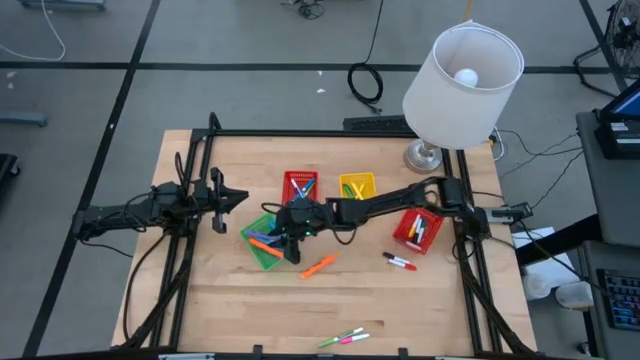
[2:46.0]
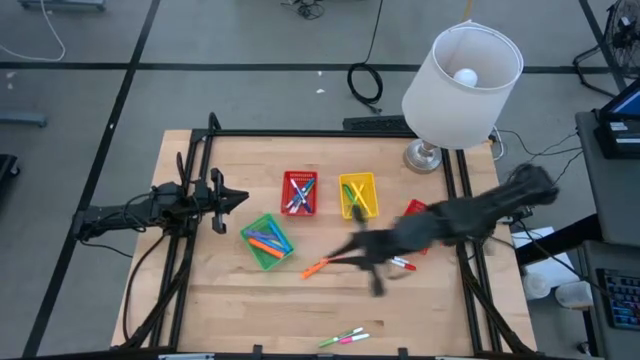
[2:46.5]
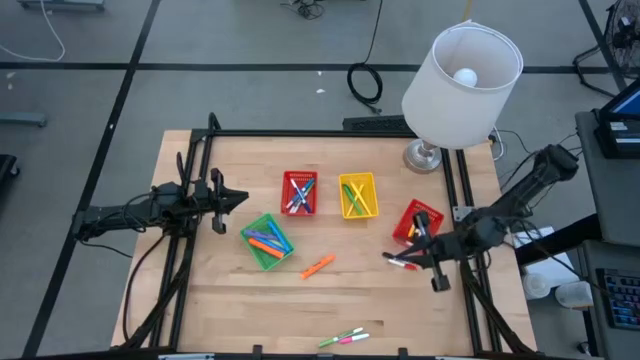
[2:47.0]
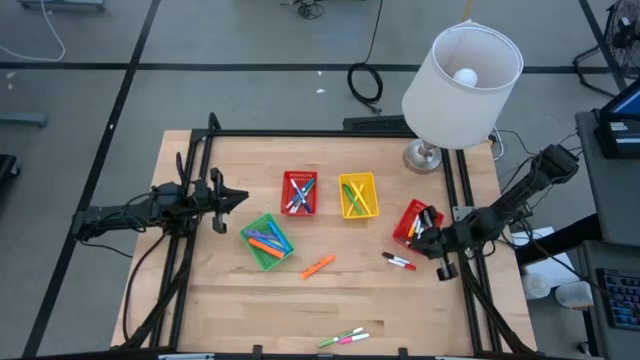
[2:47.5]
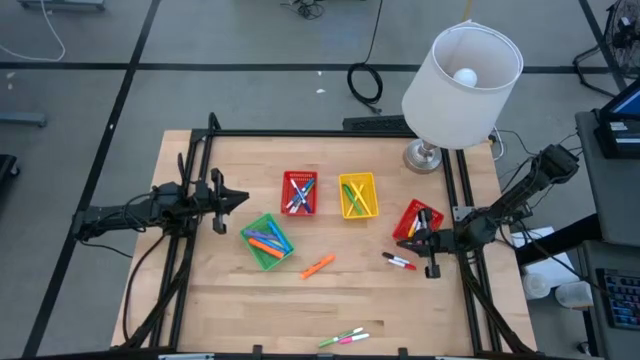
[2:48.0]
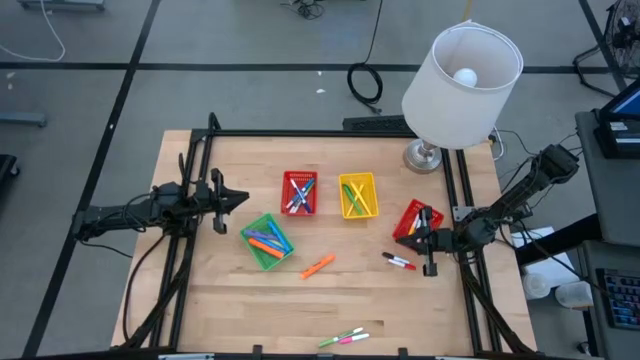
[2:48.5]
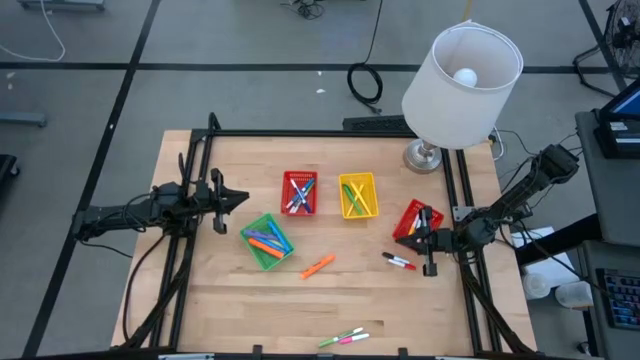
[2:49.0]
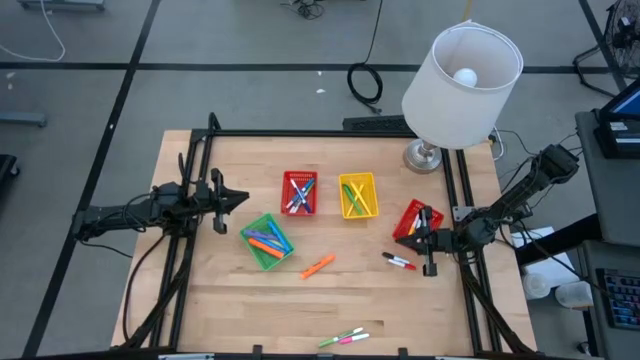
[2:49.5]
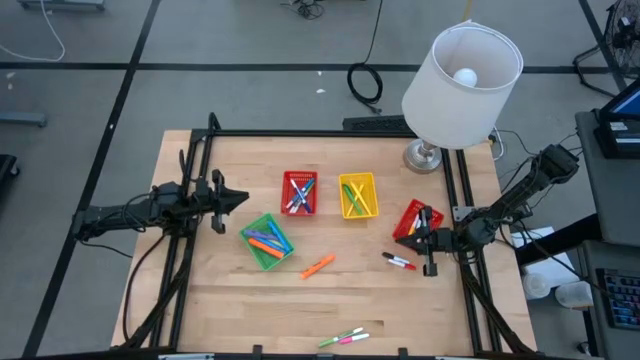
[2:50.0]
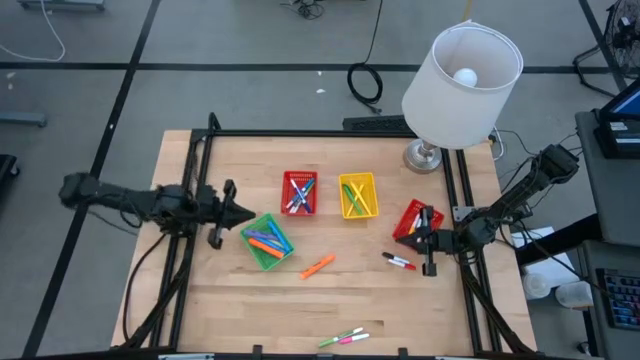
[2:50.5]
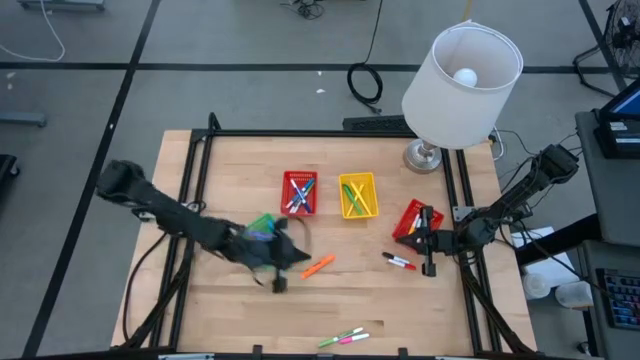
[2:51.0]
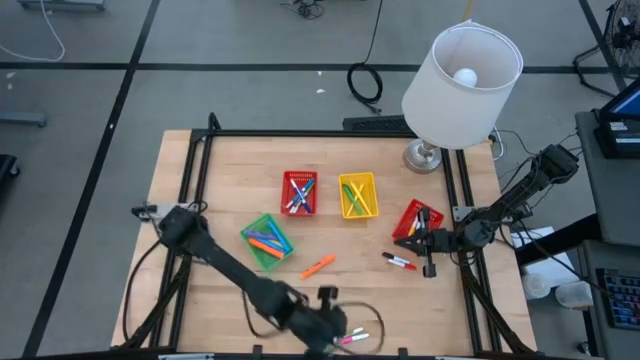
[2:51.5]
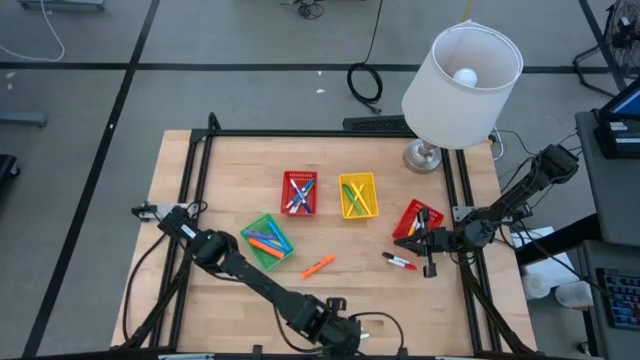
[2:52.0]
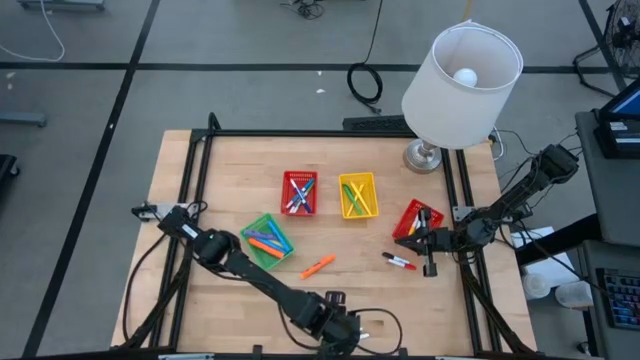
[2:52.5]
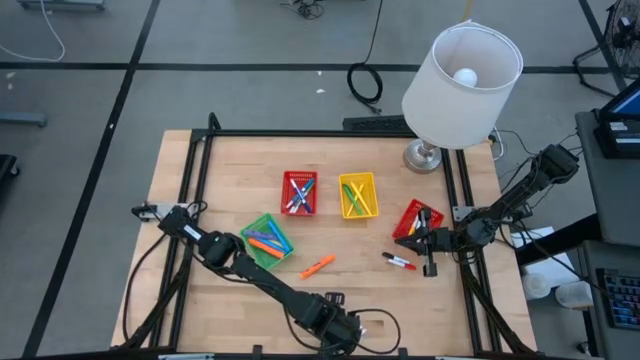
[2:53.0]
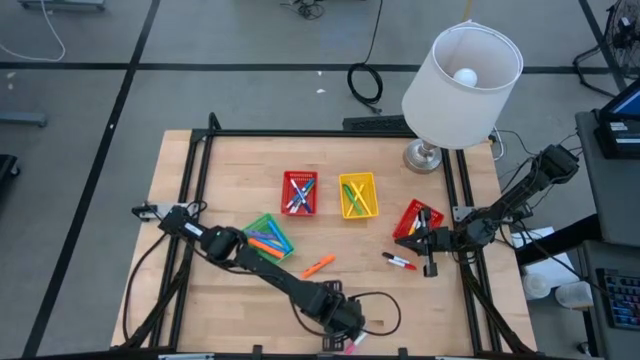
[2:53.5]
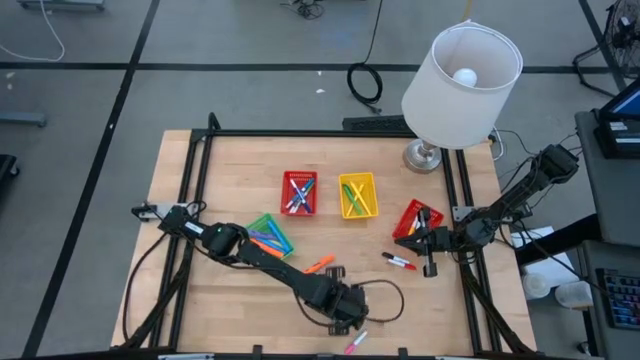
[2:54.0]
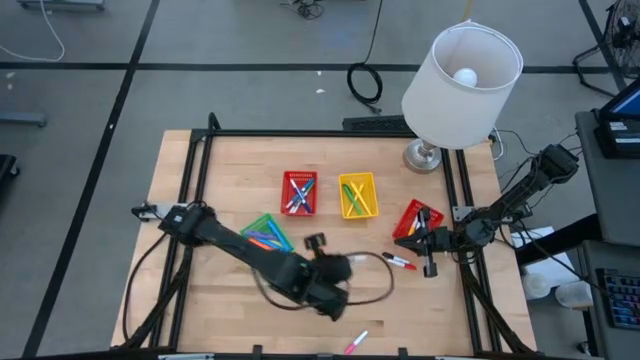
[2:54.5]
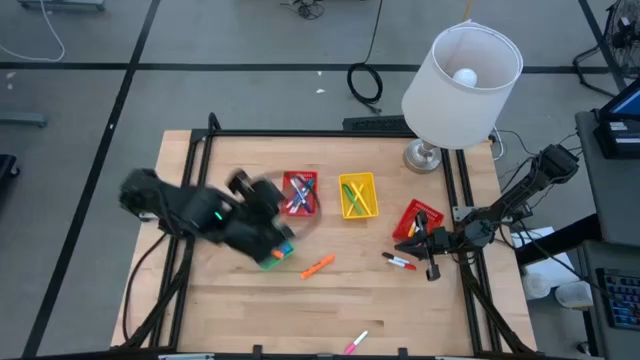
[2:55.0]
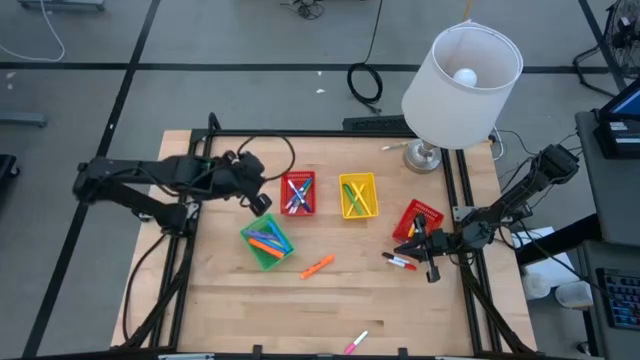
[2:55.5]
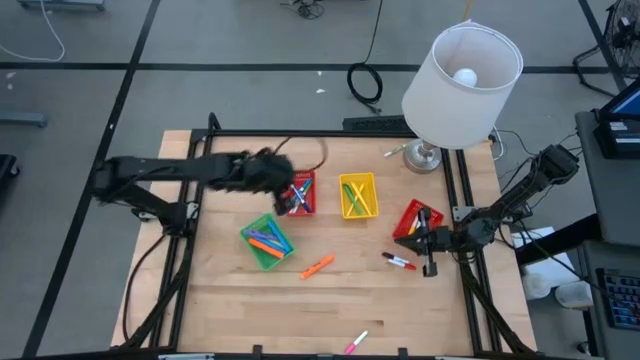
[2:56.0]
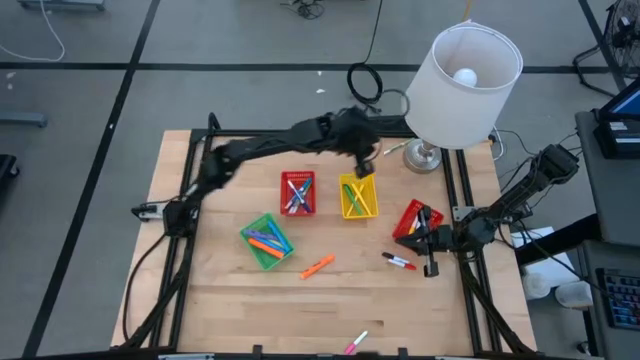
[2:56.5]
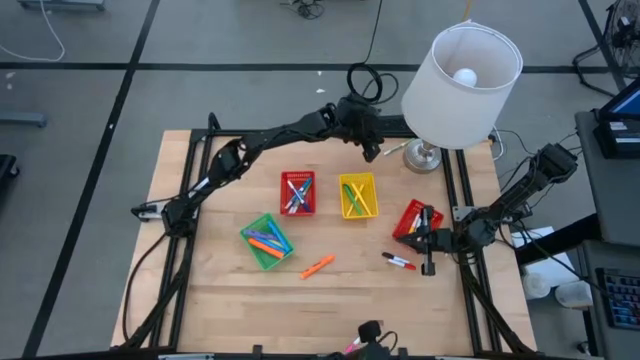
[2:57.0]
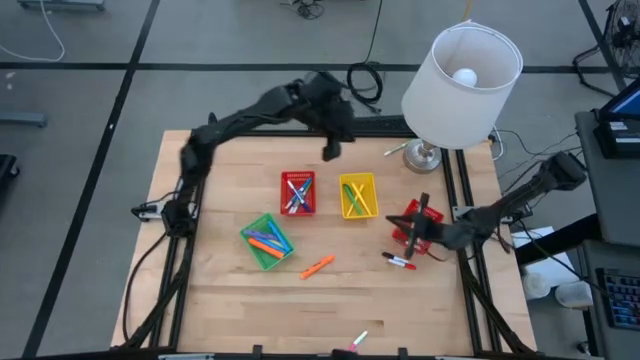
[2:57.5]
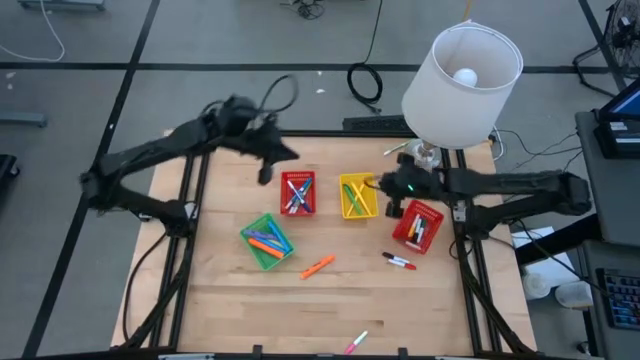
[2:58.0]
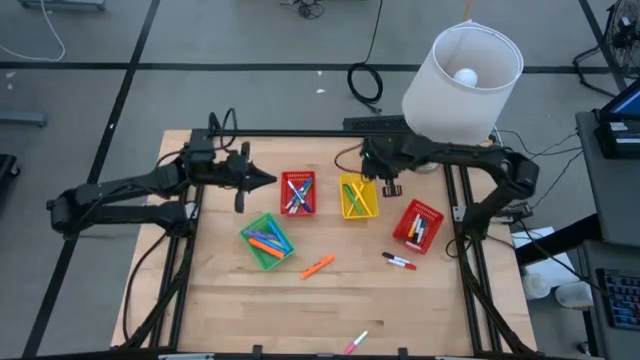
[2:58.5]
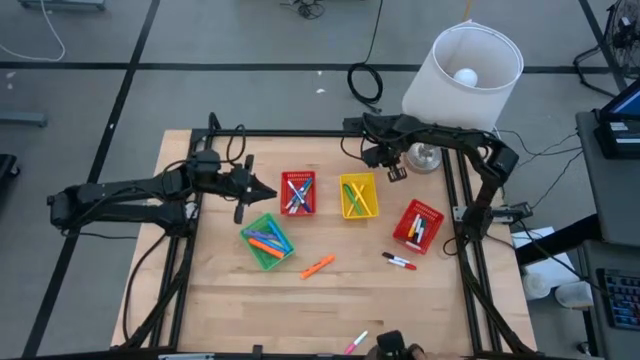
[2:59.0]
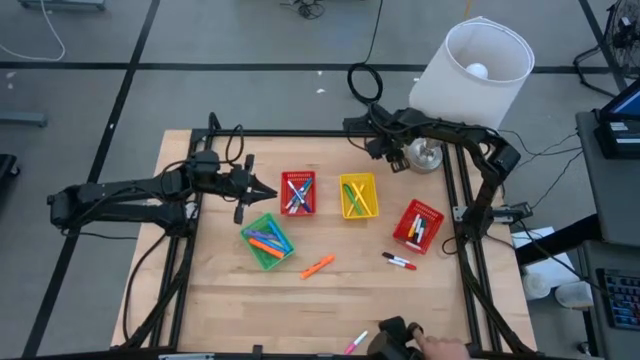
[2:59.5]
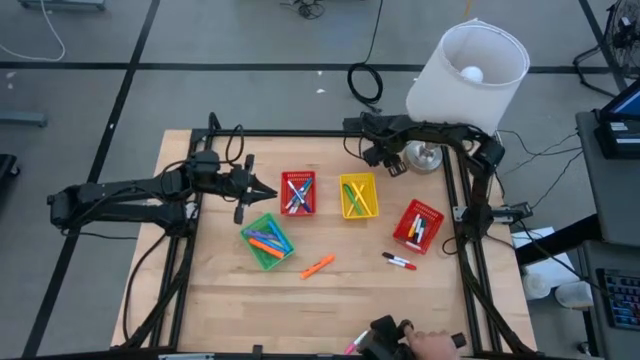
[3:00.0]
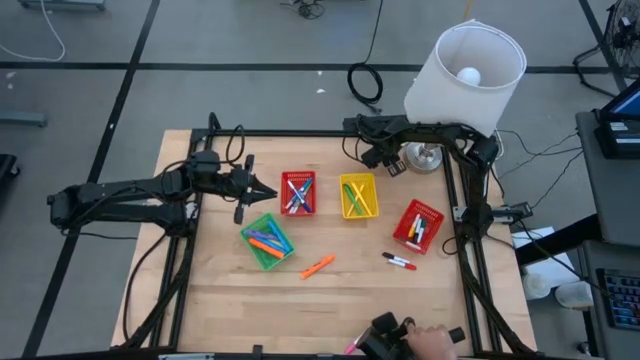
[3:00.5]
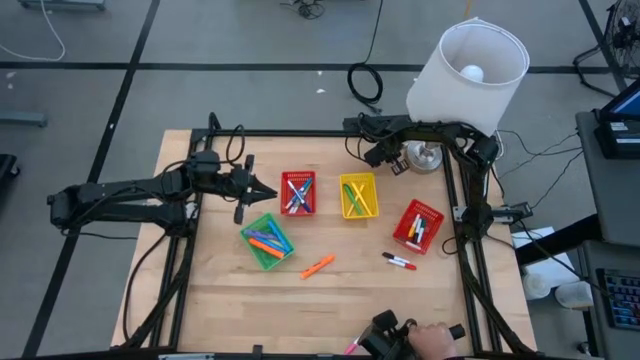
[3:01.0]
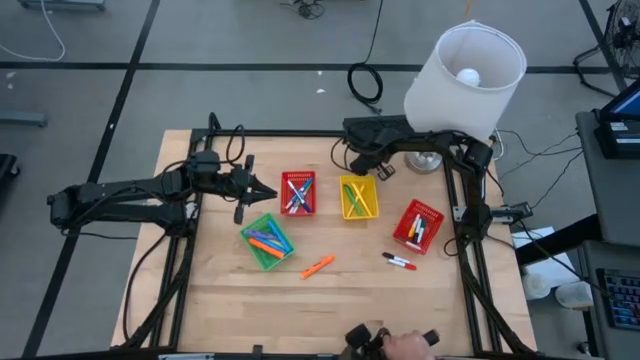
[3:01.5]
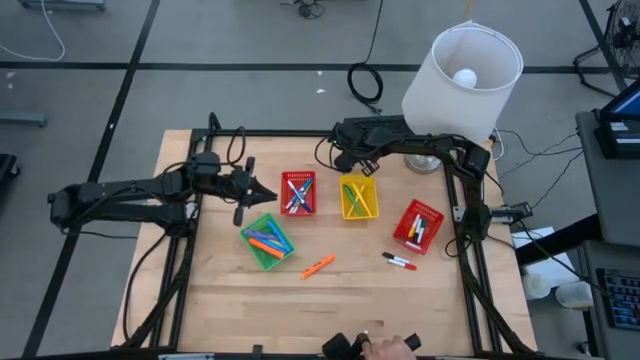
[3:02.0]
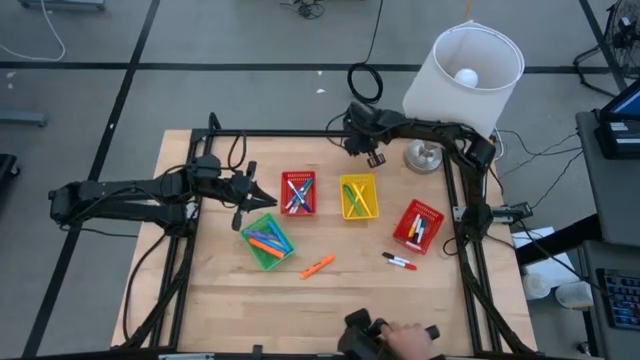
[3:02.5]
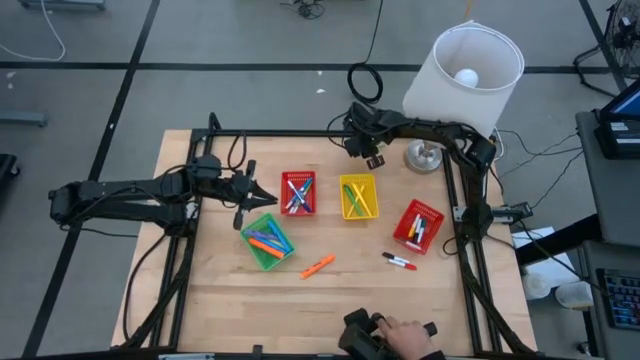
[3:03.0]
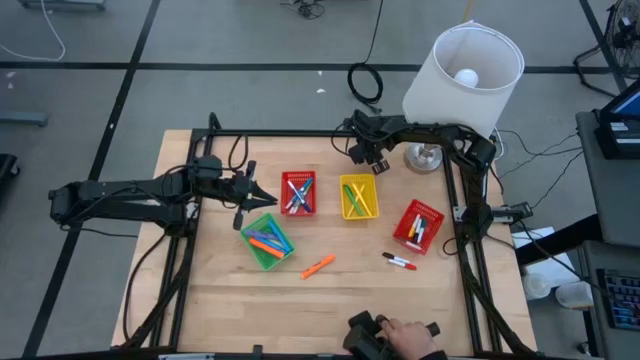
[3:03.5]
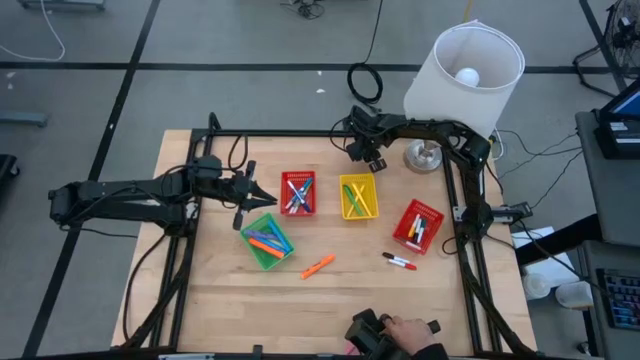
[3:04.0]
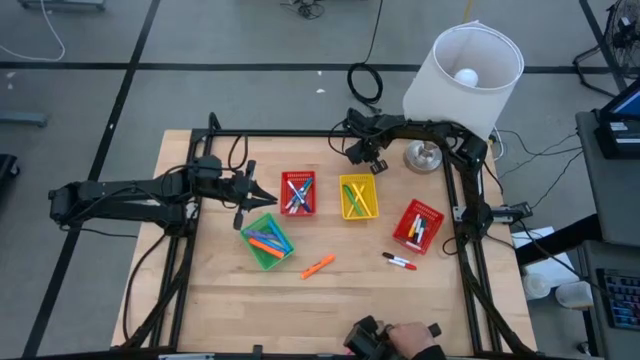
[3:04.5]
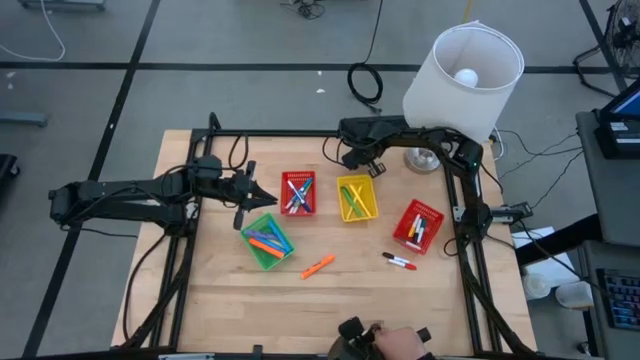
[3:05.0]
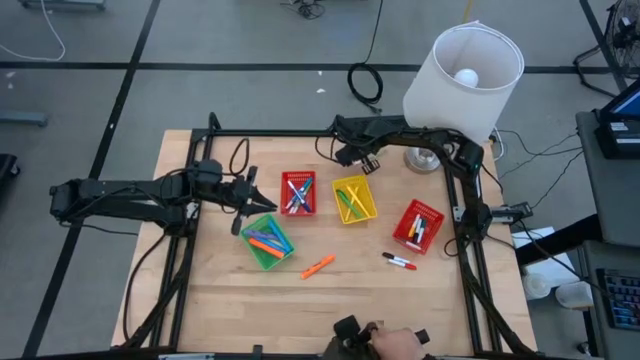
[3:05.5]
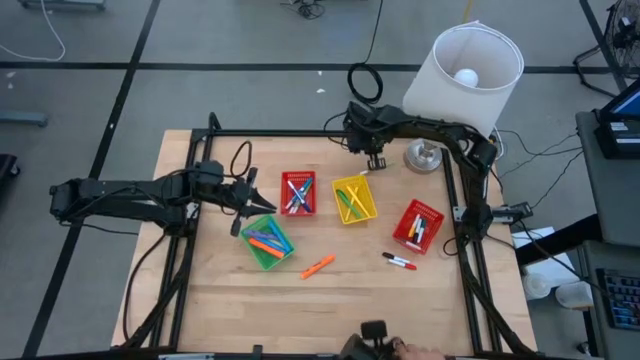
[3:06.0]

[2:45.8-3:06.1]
Task: Pick & Place Markers
Put the light green highlighter into the left red bin

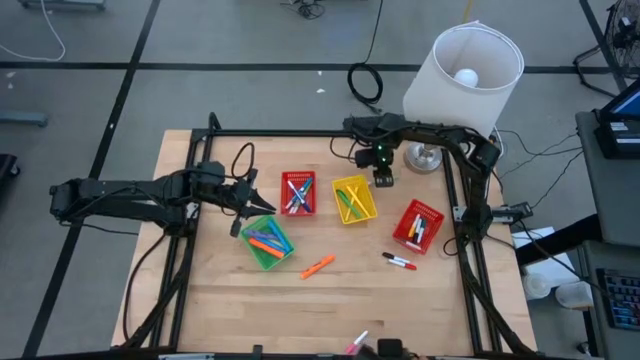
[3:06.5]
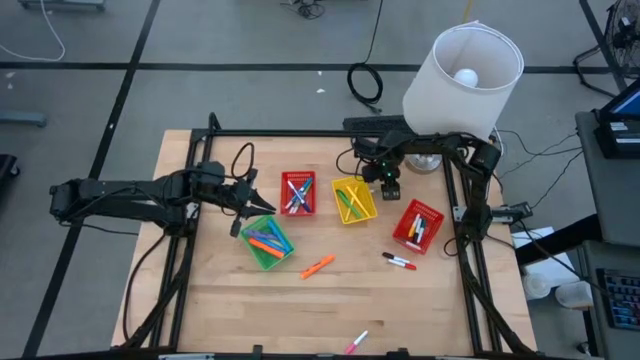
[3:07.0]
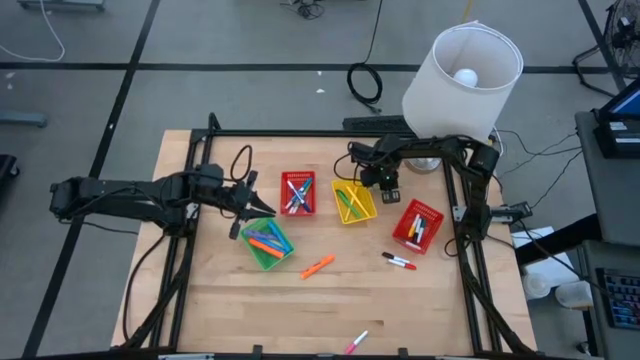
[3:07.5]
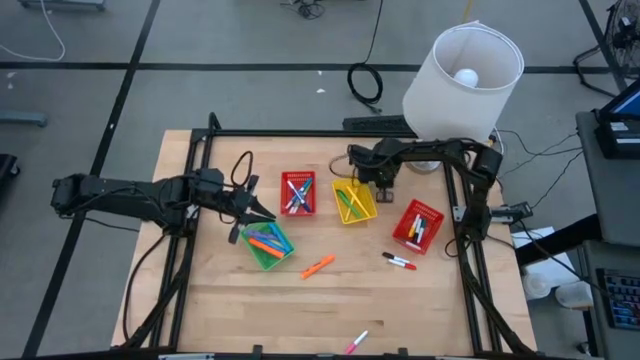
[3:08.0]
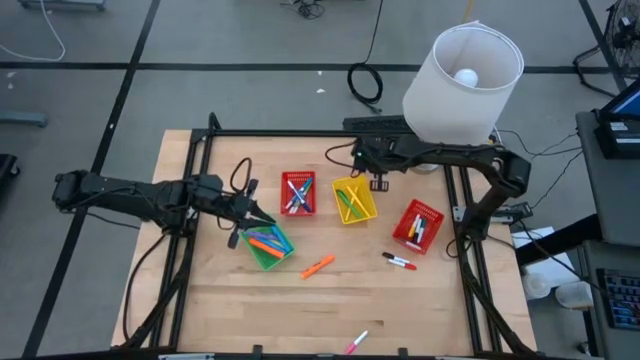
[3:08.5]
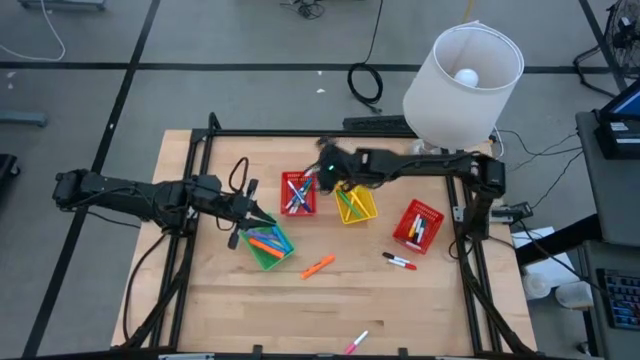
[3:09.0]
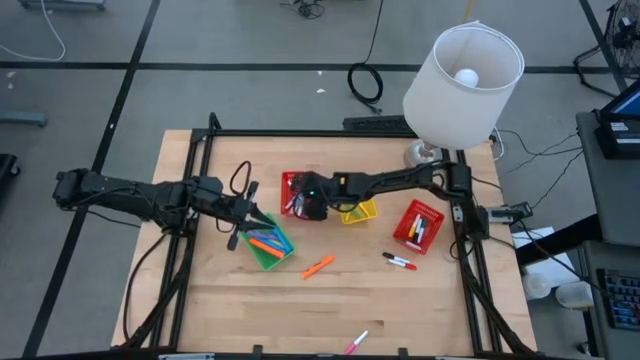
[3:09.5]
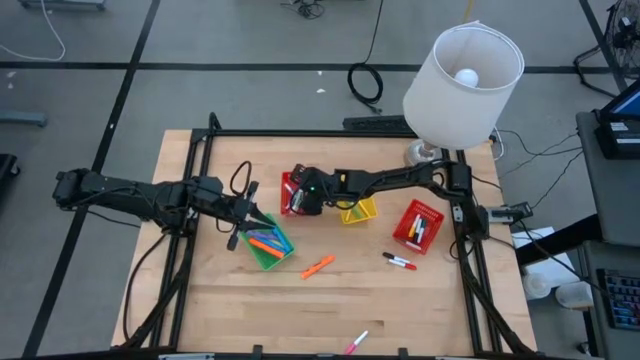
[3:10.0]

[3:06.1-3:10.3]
Put the light green highlighter into the left red bin
